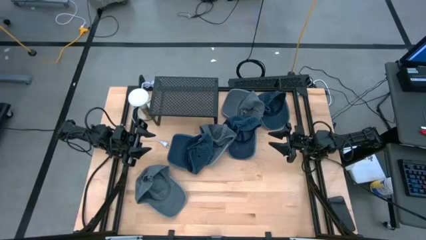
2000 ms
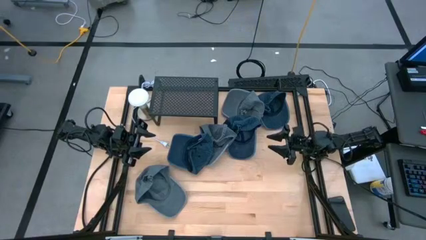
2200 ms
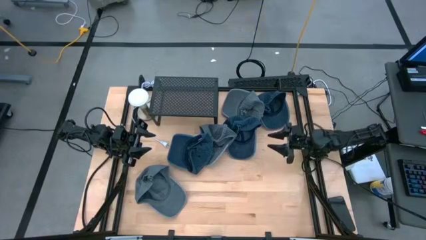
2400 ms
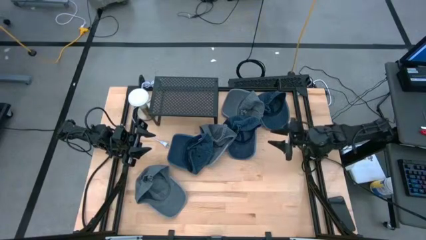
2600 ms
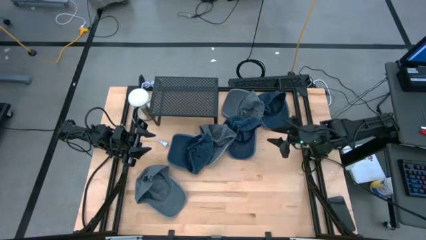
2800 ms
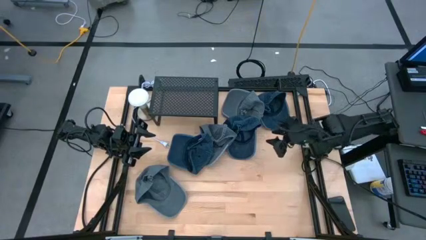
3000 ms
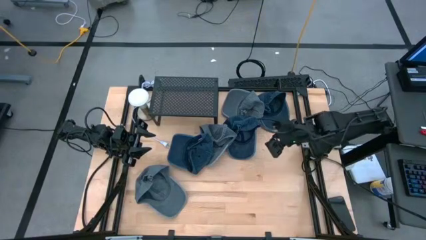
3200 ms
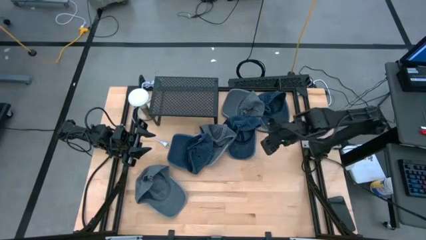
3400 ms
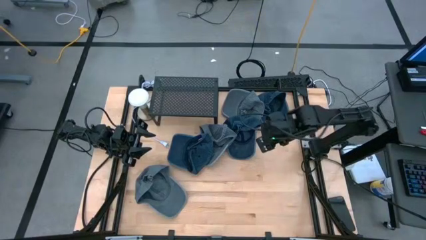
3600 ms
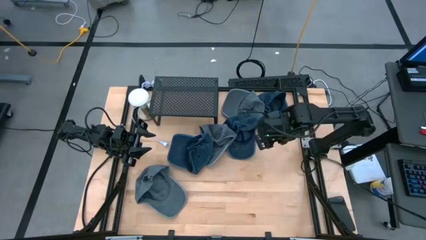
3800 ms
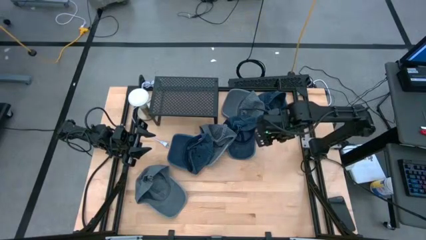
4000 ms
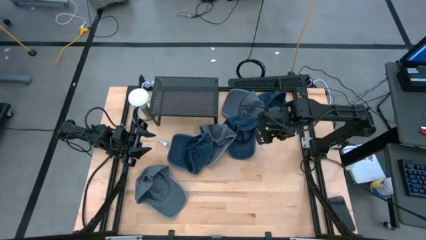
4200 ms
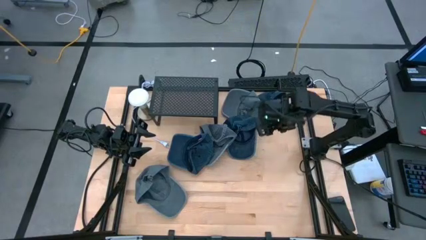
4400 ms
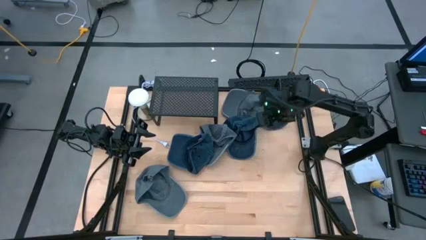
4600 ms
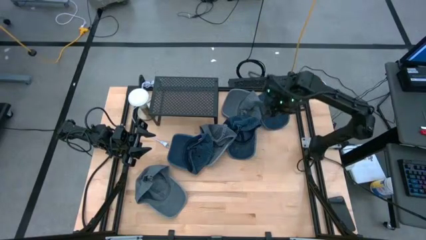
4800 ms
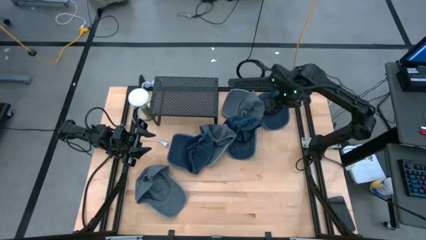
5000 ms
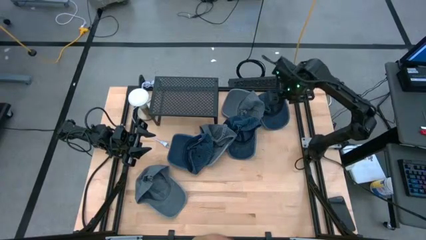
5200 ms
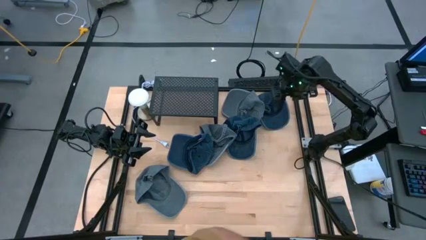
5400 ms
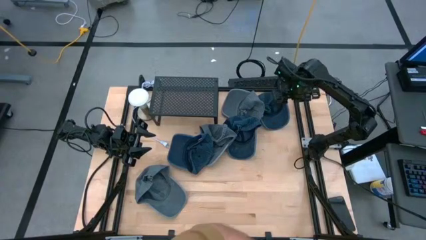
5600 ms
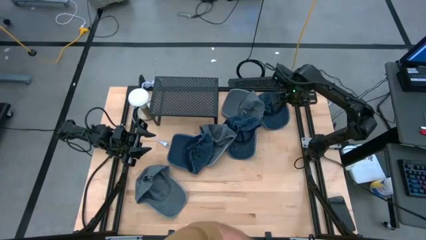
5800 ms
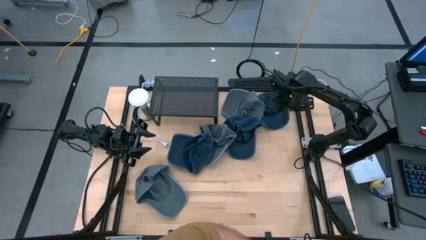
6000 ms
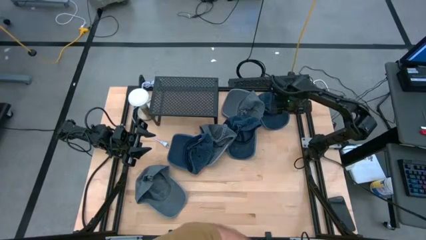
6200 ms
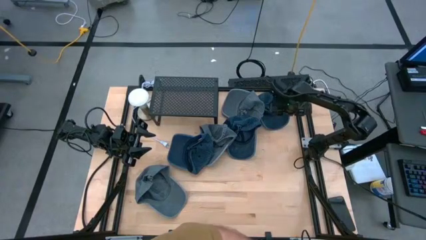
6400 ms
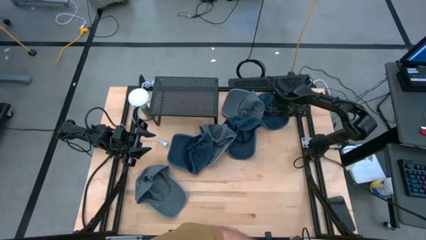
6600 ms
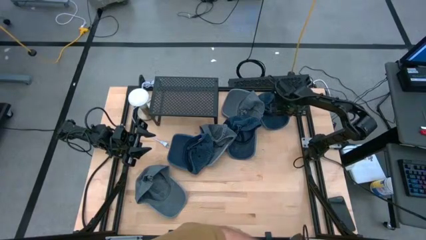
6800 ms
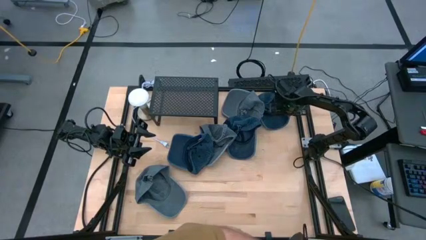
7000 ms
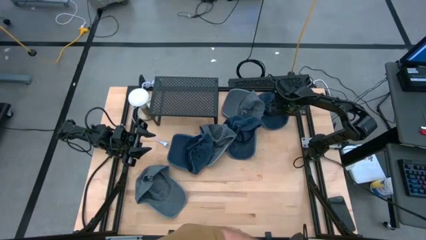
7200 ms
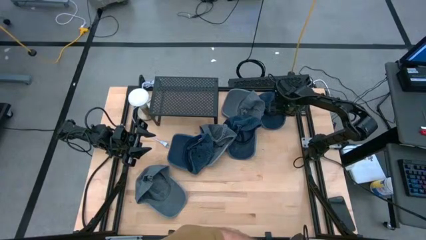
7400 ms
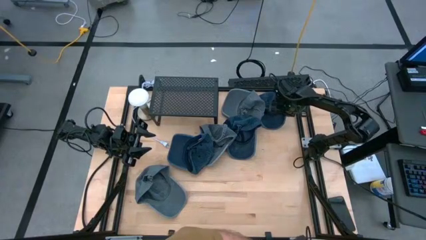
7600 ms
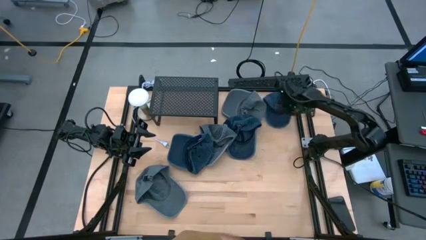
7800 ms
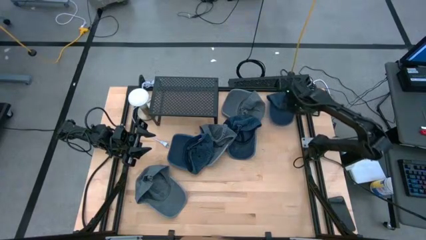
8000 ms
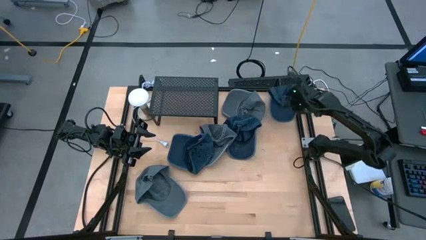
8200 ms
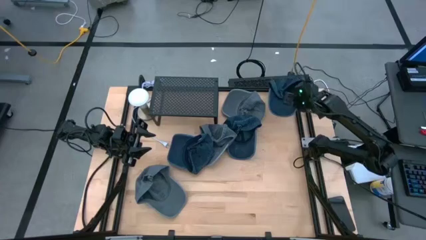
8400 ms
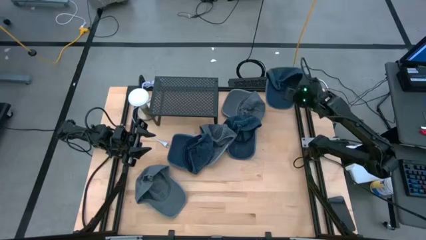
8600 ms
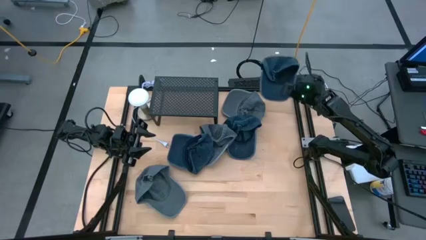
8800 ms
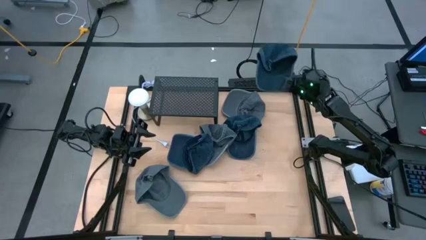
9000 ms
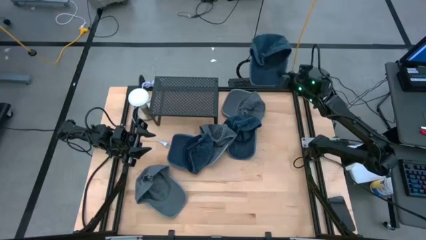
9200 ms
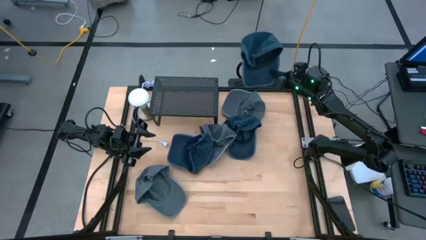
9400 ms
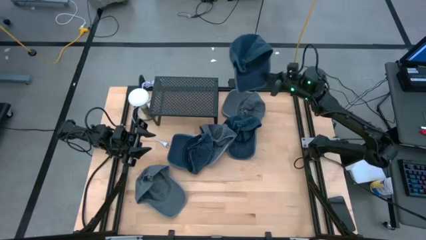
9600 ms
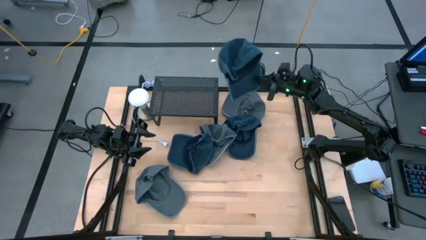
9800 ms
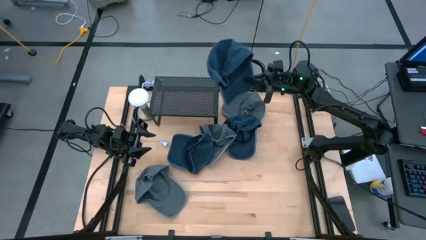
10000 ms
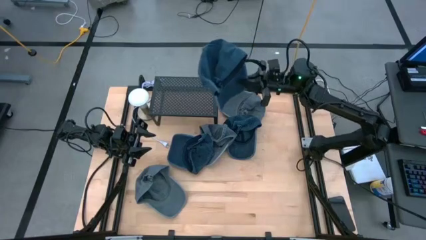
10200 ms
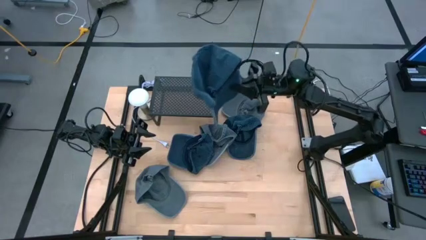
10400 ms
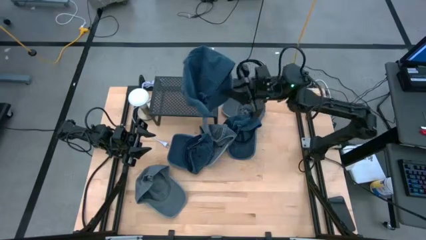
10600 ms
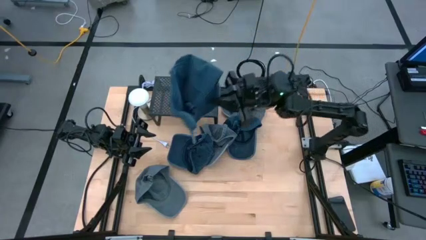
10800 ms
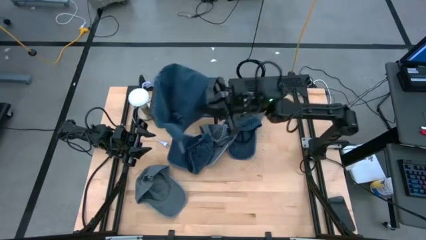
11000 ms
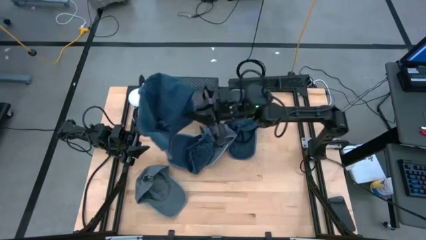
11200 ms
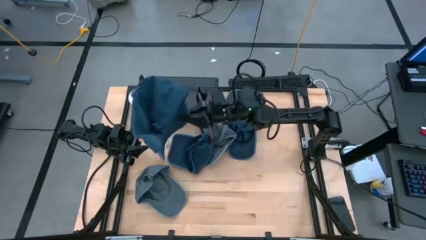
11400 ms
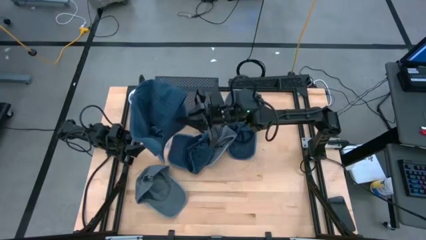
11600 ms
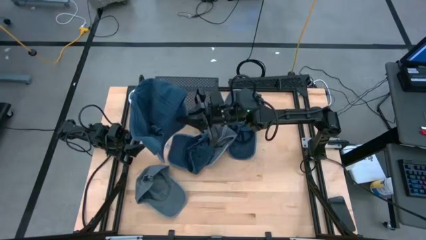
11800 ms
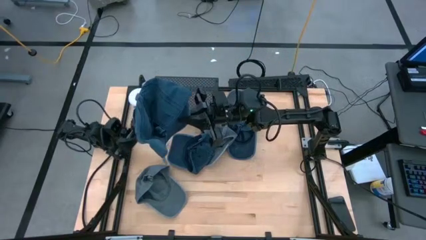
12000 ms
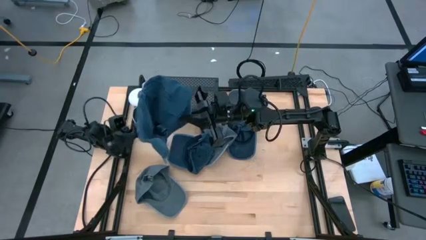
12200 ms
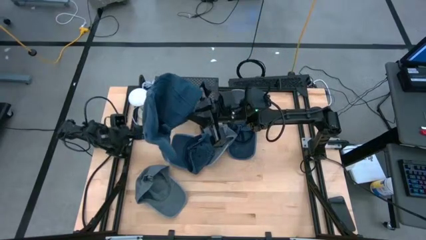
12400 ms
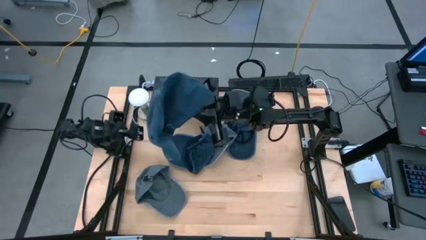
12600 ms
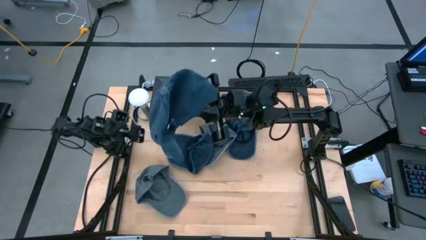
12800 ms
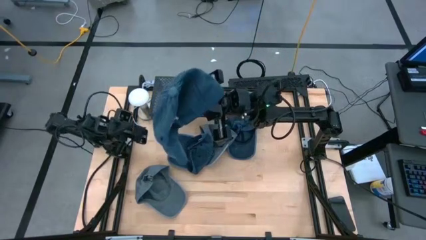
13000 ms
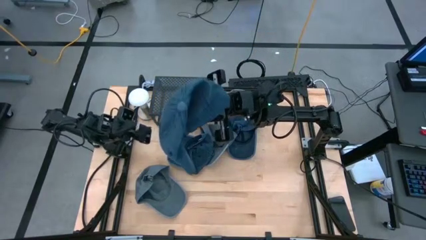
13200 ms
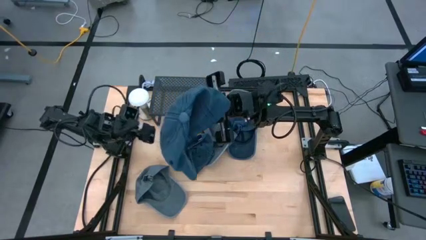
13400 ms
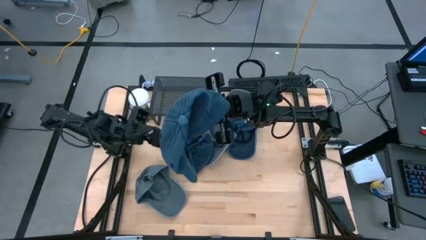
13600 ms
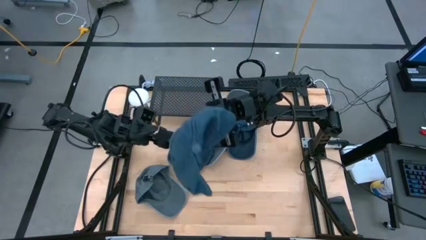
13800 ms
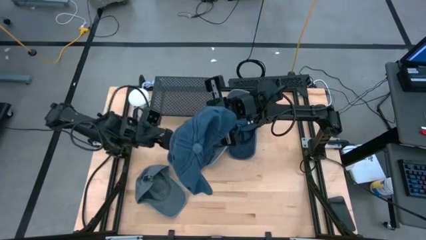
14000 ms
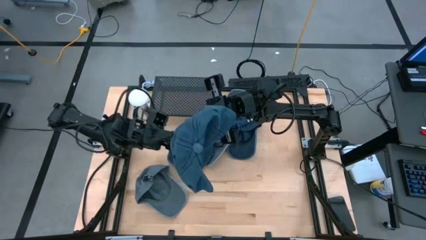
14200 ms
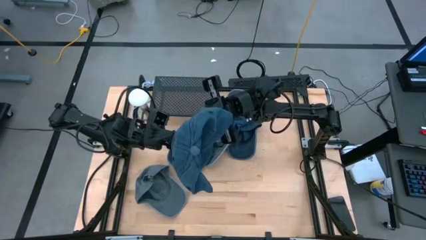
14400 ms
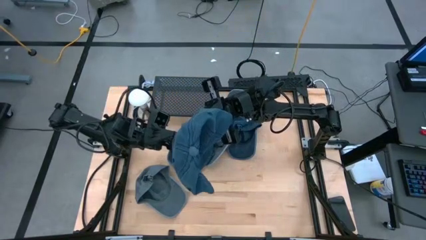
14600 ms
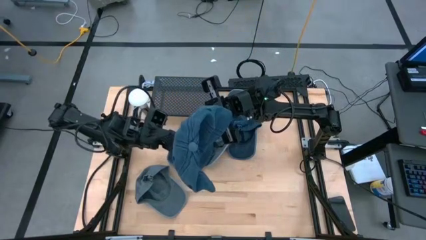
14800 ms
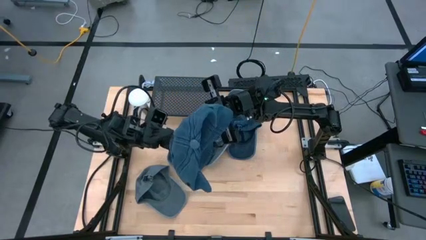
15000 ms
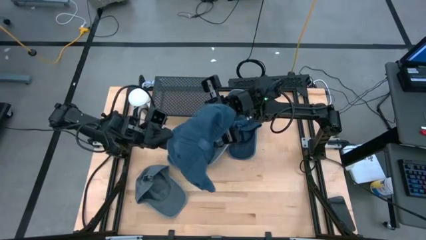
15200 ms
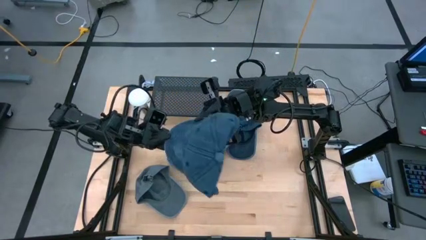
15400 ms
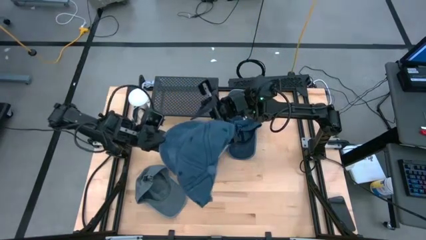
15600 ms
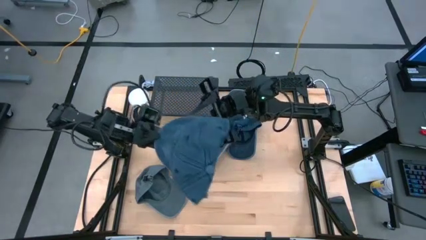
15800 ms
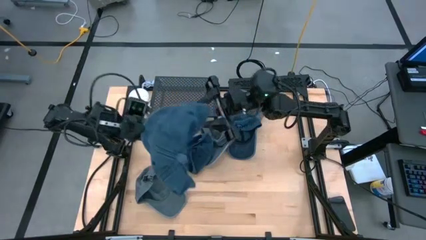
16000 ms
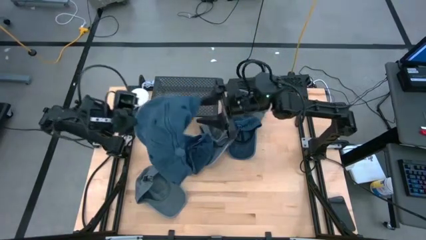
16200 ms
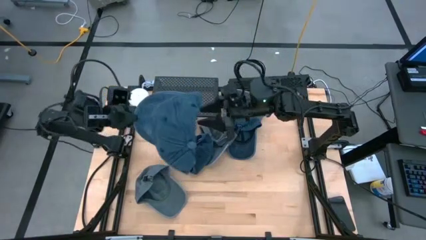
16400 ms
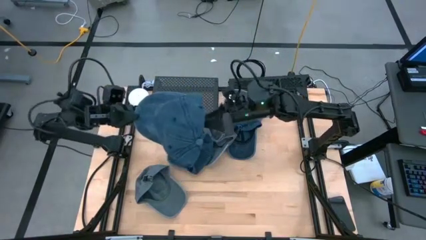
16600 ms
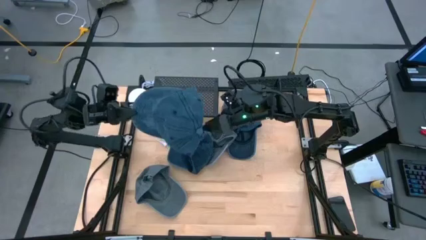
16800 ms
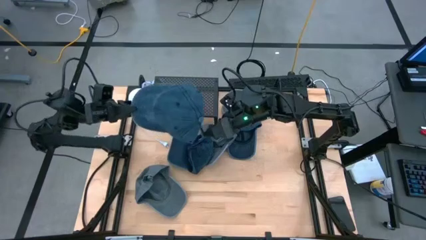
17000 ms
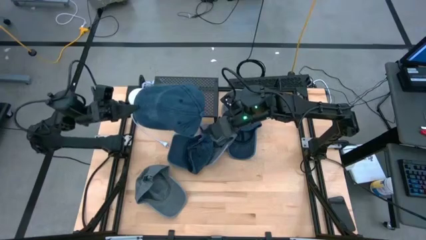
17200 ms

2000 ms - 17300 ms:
Task: Pick & Place hat
Put the top right blue cap on the shelf
